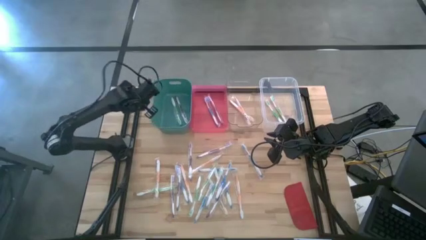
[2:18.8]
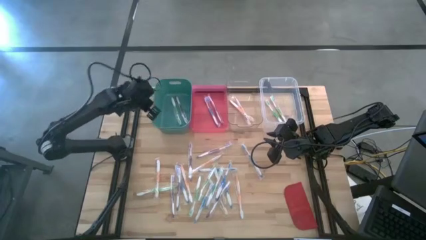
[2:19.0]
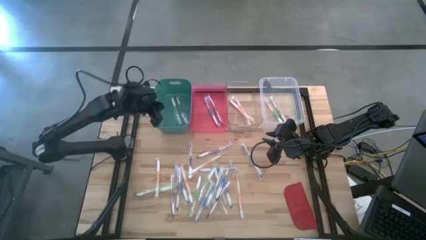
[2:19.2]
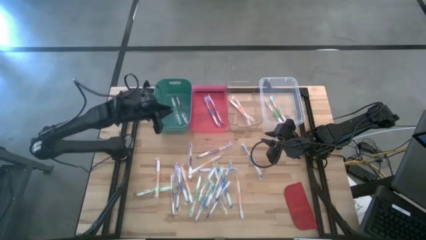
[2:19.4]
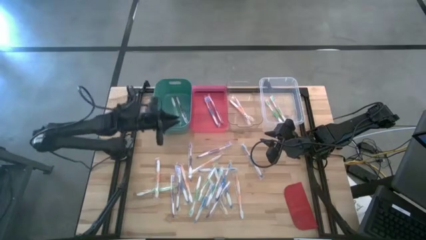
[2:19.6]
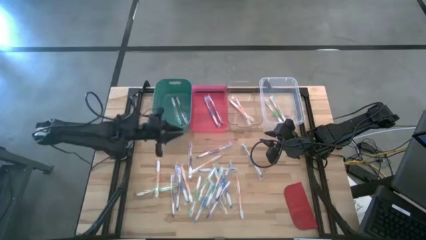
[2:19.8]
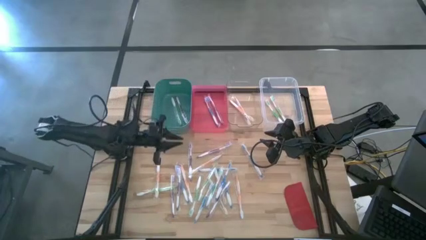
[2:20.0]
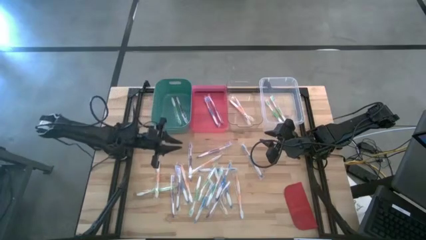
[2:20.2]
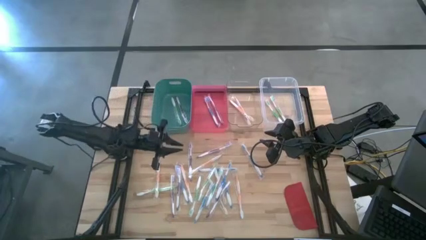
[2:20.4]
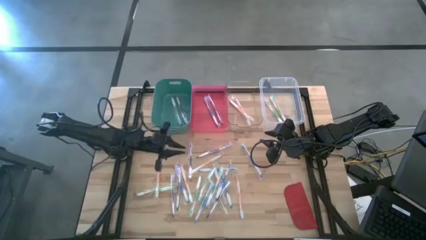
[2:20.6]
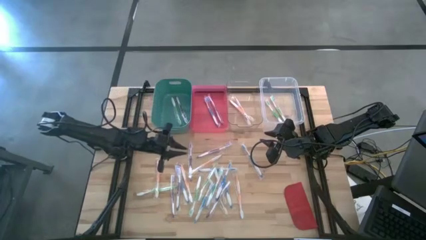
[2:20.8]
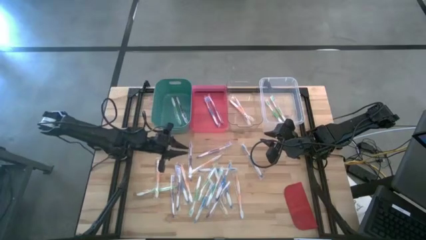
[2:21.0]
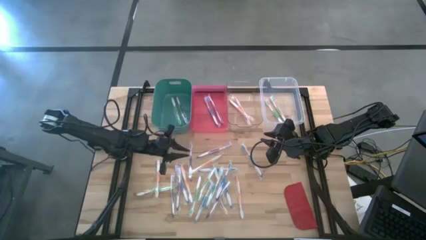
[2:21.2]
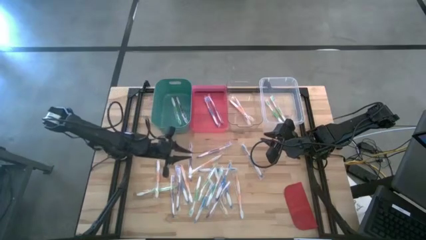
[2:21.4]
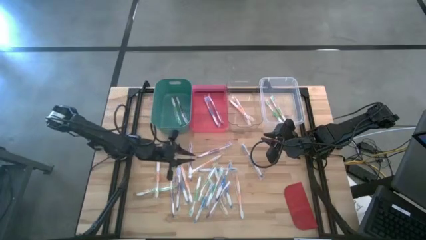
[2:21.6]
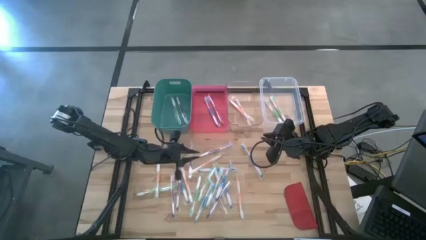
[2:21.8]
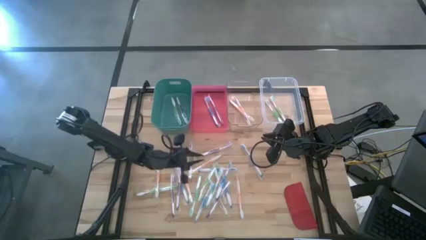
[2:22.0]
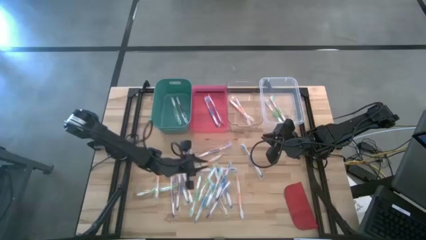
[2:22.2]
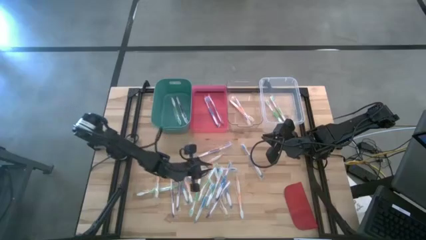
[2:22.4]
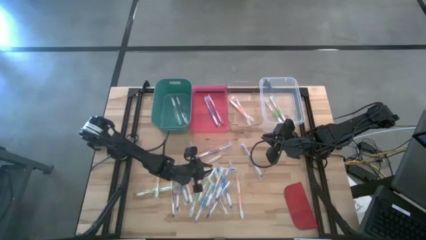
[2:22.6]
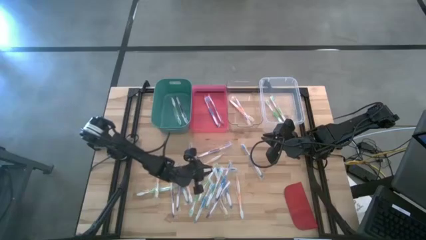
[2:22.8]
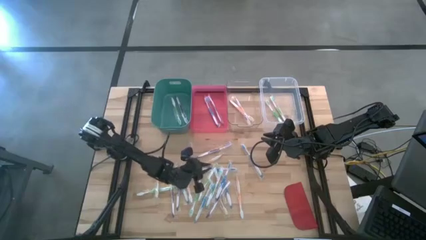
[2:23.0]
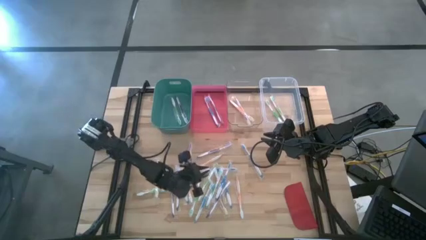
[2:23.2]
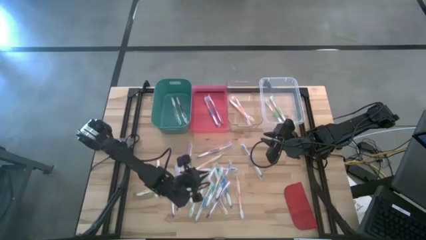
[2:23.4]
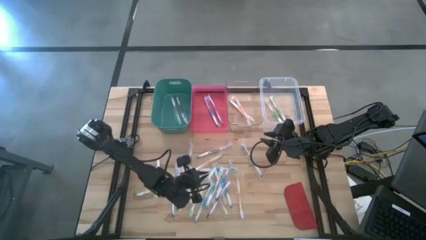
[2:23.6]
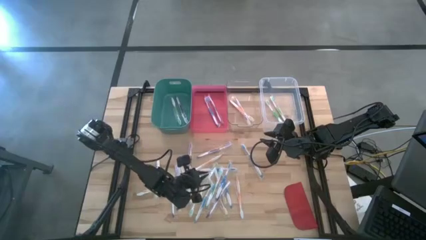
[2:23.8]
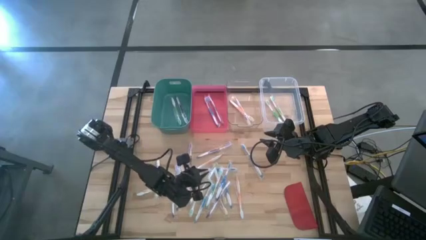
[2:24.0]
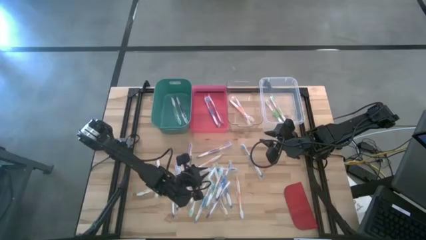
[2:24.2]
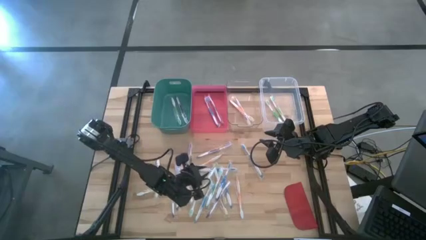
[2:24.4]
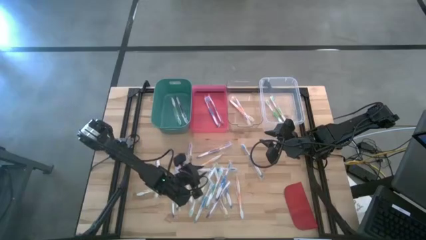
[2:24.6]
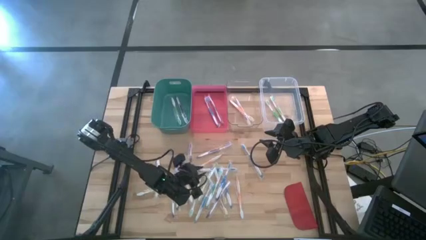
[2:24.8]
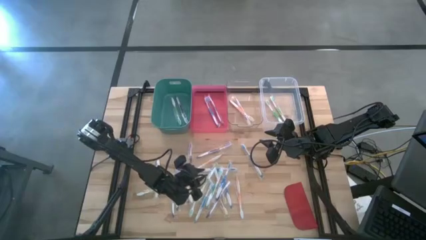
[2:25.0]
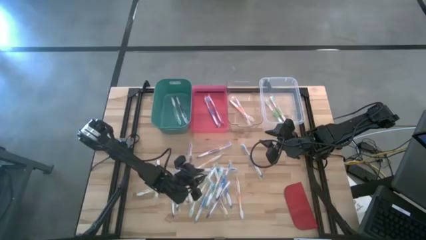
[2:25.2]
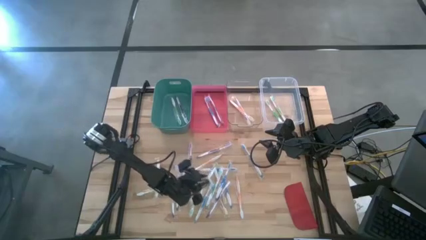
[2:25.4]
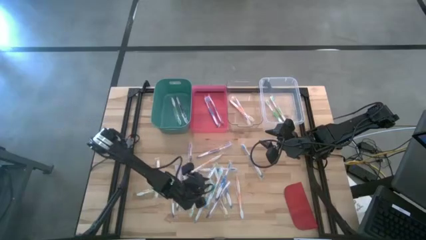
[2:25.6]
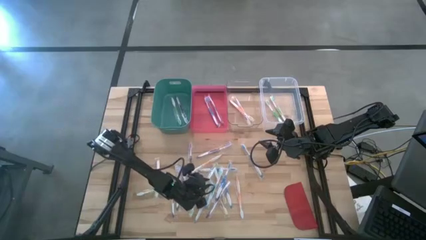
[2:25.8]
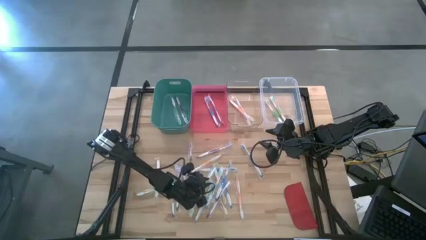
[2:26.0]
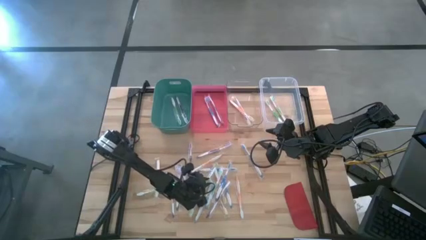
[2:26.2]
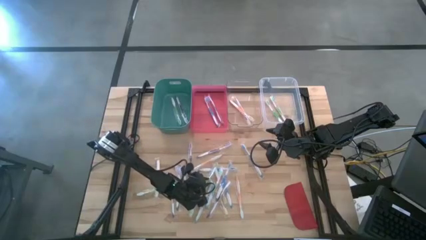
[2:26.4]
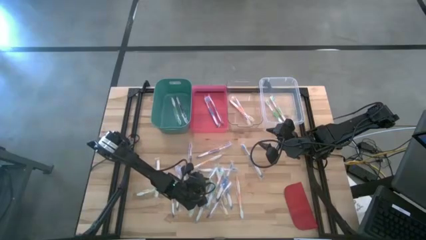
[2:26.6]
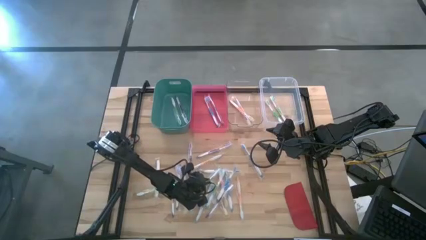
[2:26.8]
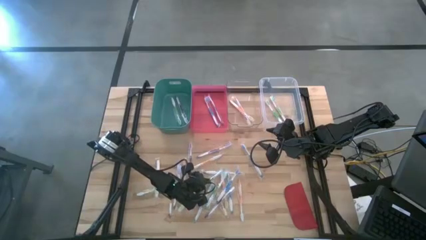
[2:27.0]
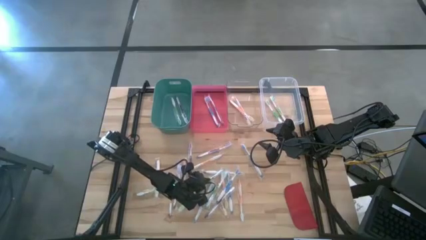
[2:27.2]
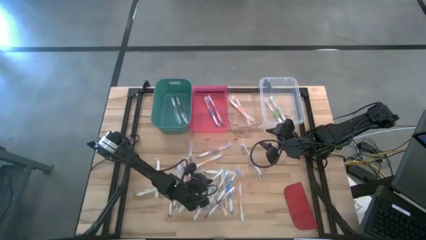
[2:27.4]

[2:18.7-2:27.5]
Task: Pick & Place Toothbrushes
Put the green toothbrush into the white bin

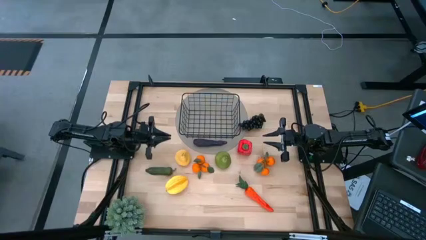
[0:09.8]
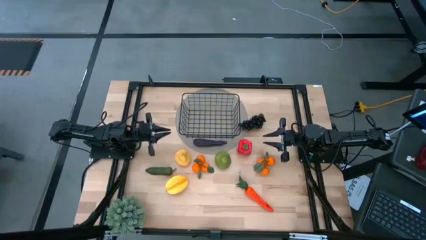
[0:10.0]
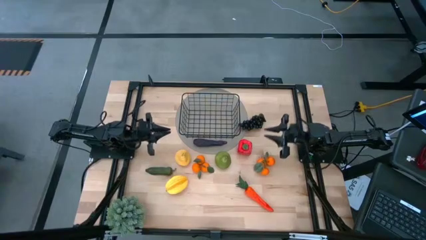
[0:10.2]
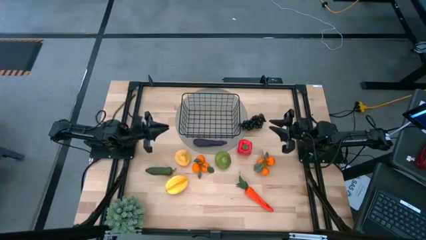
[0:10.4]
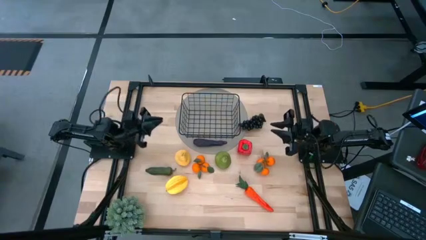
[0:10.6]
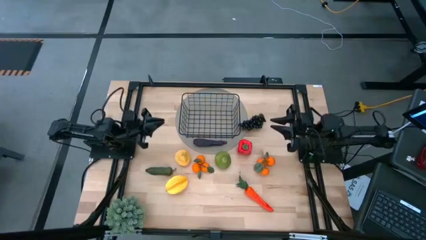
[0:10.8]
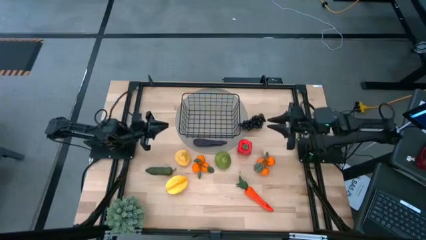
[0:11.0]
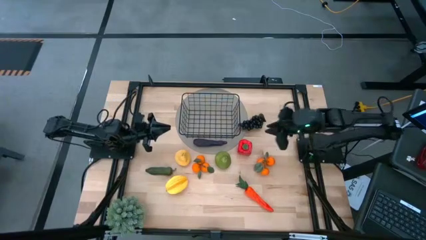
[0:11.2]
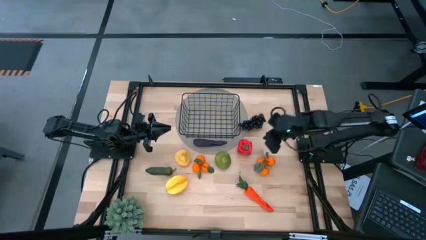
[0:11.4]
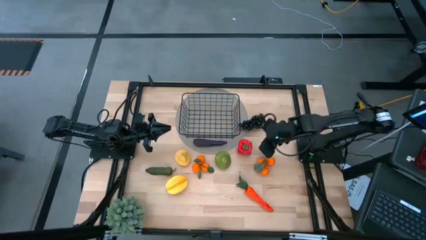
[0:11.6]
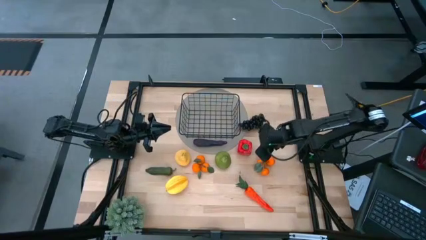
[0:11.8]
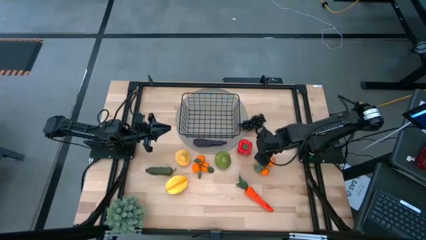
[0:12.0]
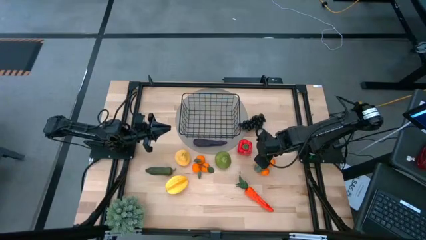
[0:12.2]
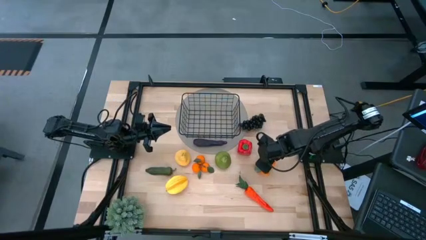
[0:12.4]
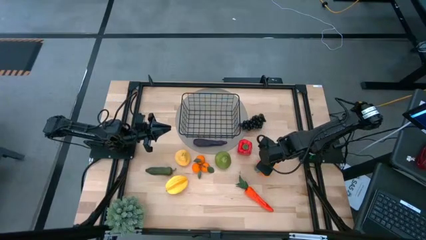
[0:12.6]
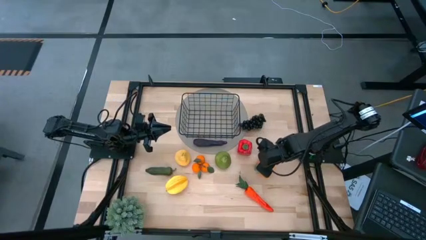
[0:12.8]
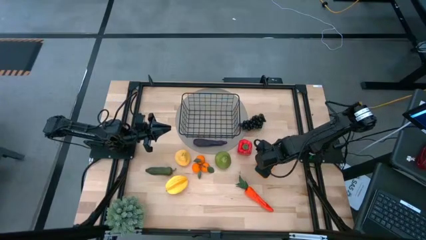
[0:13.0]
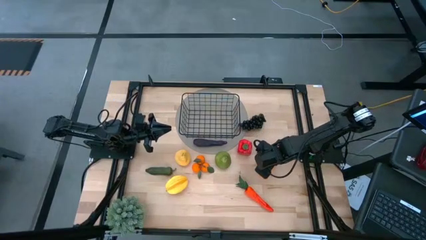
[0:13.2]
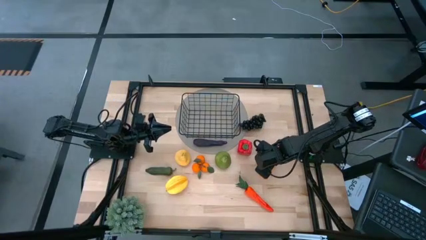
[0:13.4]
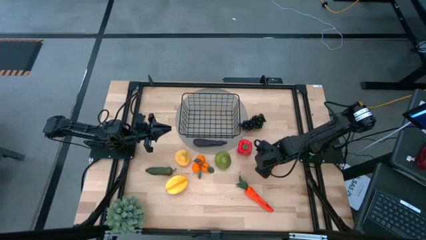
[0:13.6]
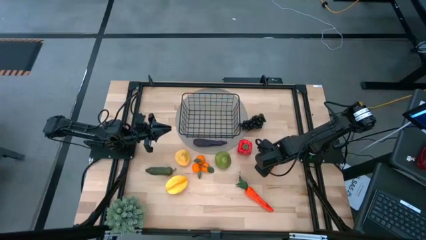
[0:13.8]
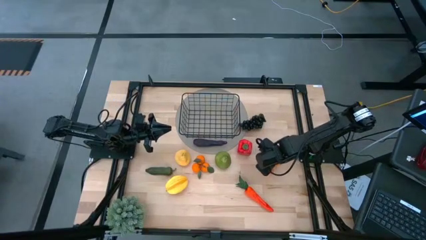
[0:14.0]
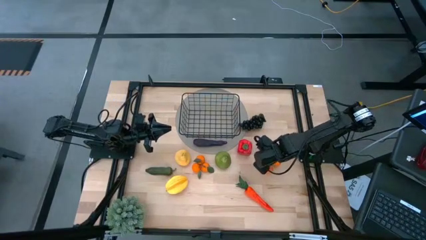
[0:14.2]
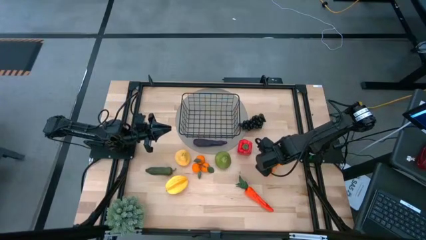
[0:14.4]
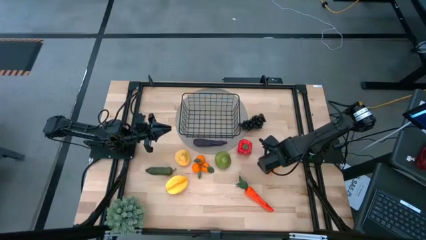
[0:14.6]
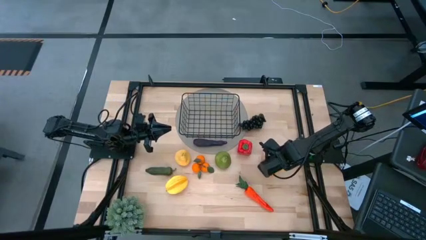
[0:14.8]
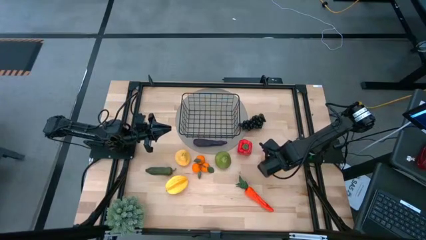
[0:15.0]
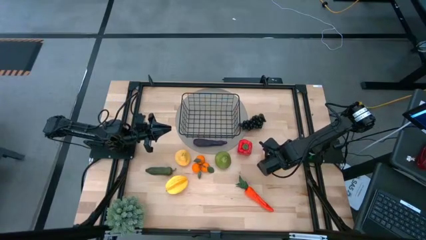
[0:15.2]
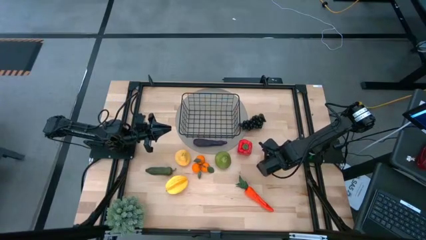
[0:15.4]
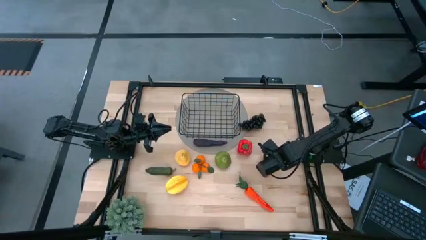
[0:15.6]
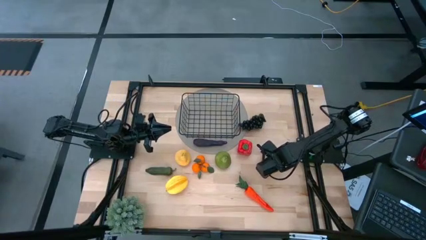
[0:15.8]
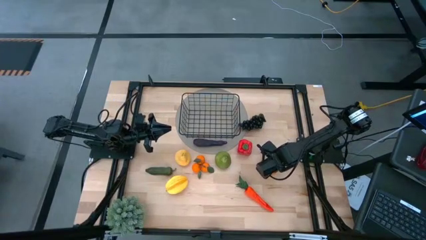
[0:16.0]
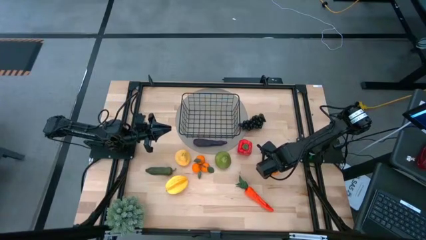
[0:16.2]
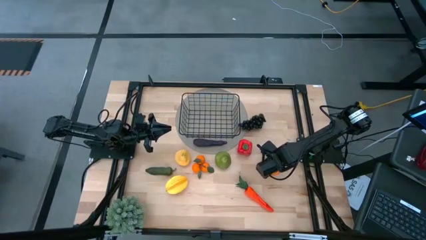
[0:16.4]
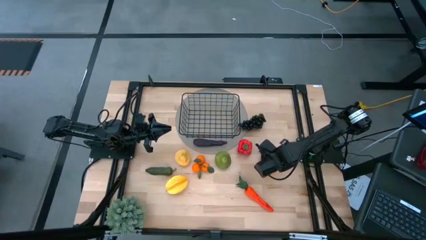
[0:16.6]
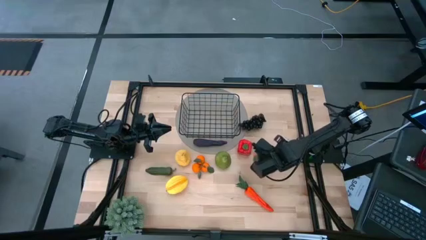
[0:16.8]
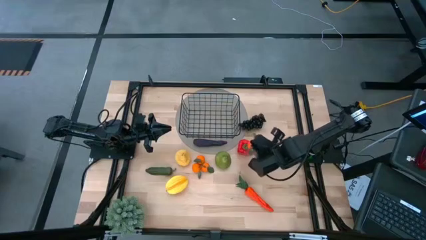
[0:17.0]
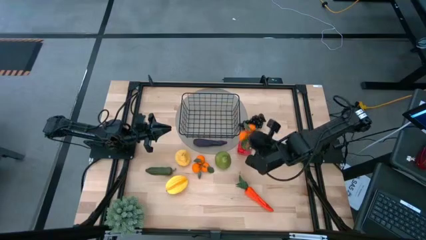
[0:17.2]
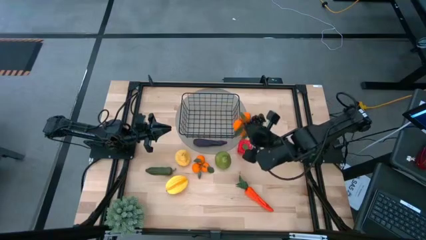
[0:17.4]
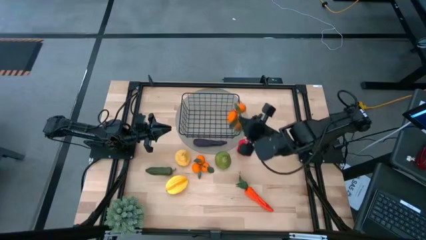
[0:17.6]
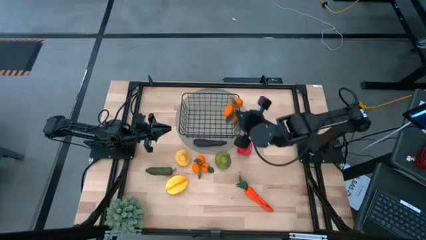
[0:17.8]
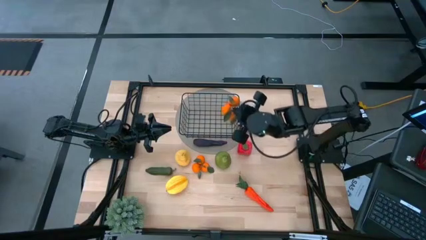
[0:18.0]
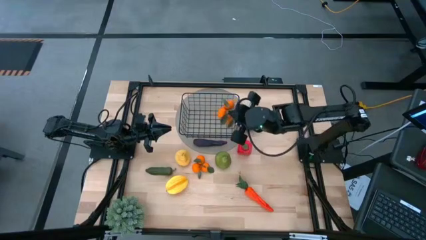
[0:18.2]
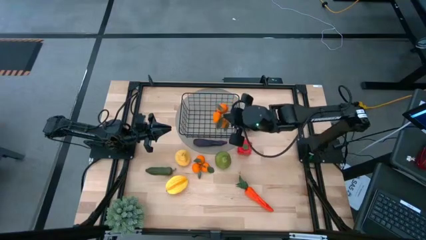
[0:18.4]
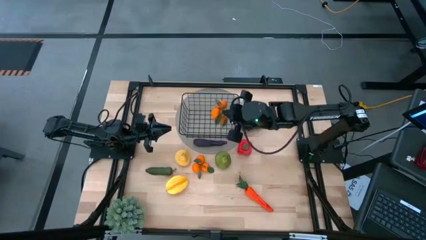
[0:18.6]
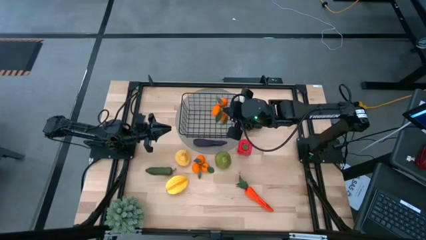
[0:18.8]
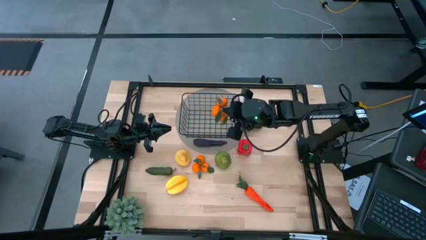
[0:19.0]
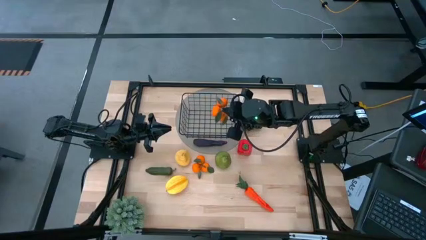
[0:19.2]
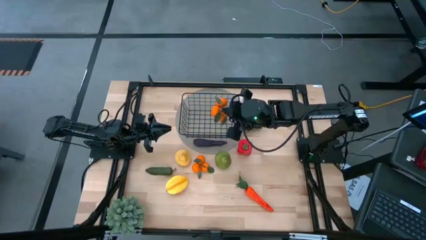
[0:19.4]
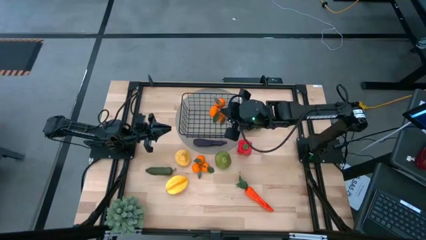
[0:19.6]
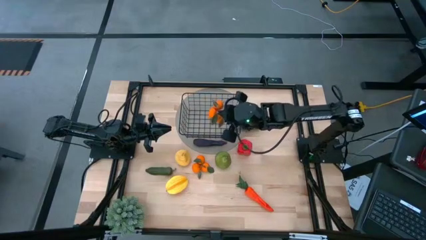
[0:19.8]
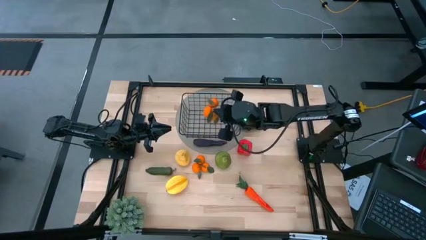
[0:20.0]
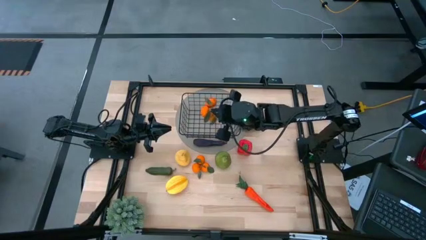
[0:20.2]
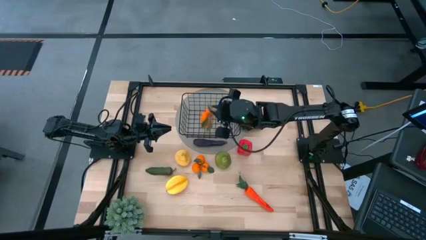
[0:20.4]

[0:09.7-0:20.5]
Task: Build produce basket
Put the right tangerine into the wire organizer
